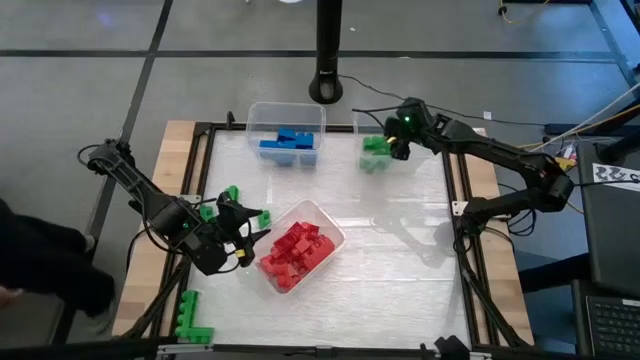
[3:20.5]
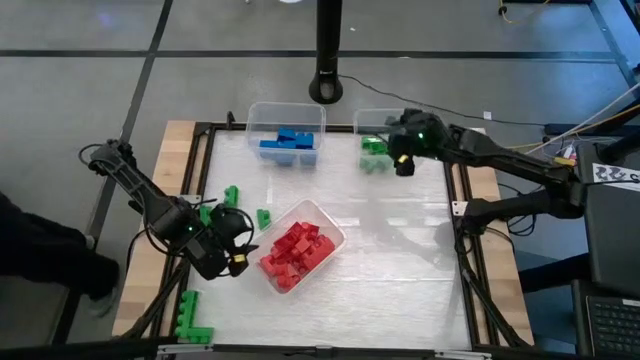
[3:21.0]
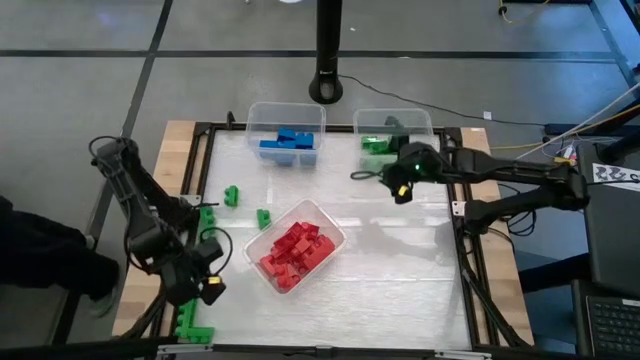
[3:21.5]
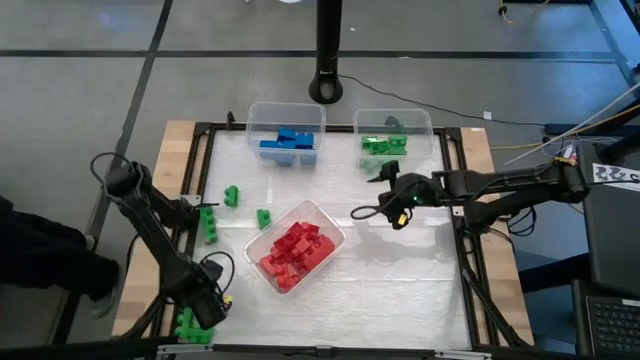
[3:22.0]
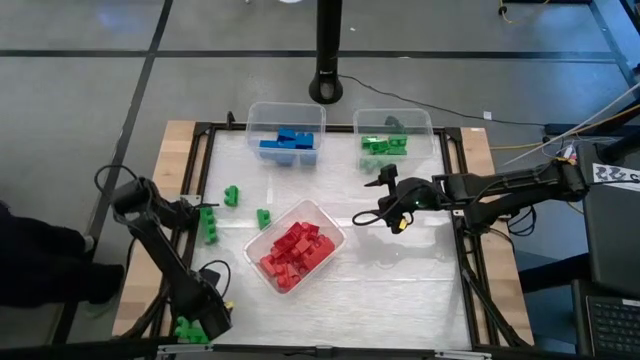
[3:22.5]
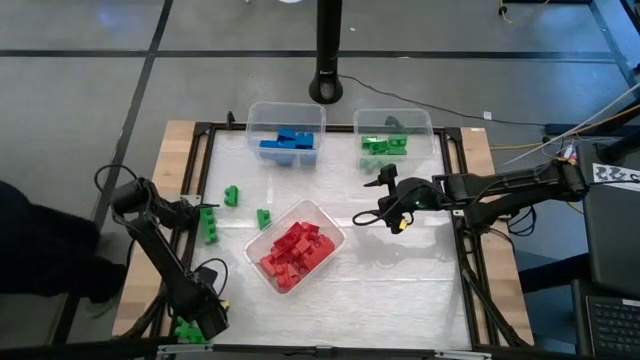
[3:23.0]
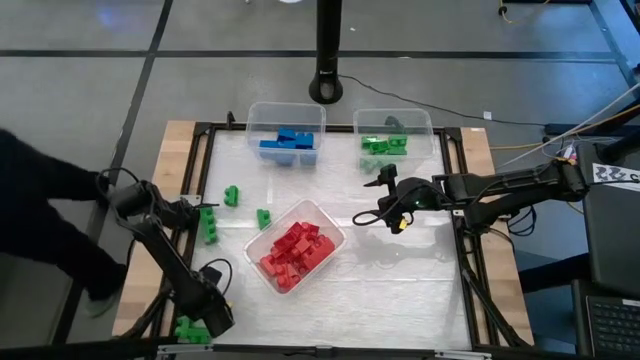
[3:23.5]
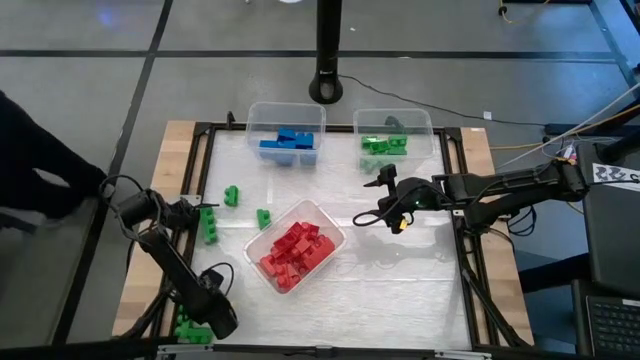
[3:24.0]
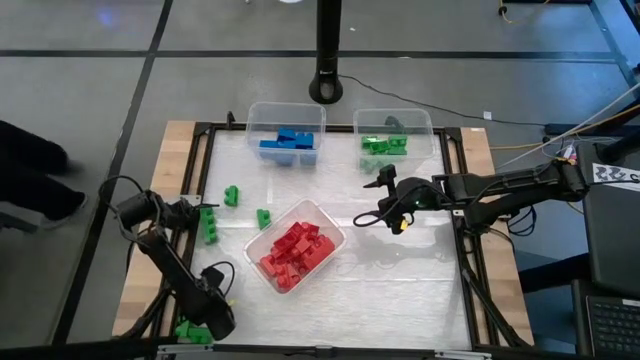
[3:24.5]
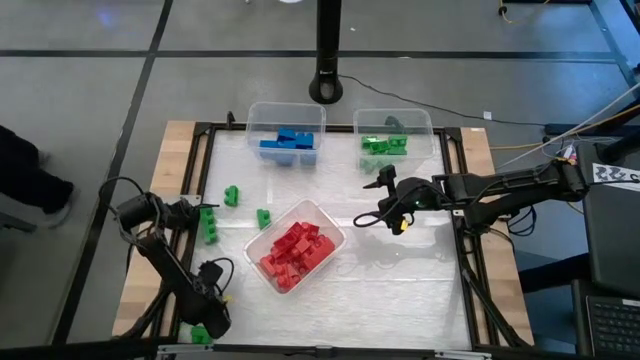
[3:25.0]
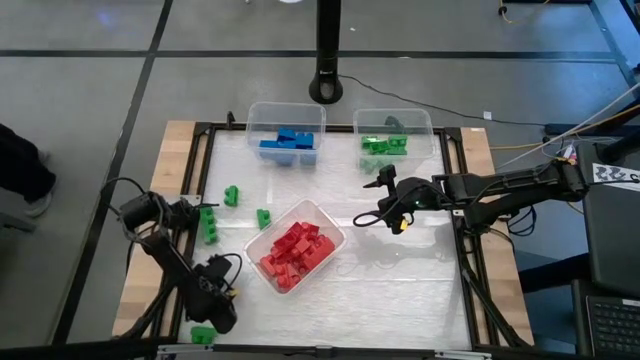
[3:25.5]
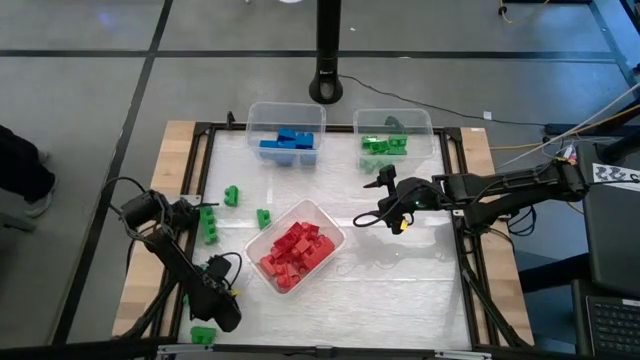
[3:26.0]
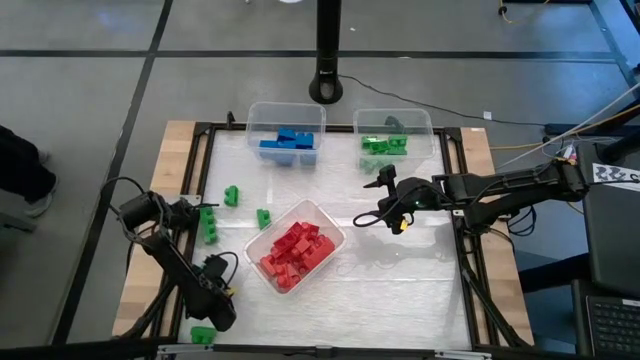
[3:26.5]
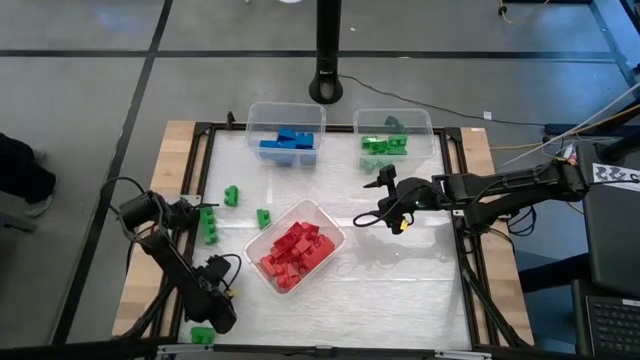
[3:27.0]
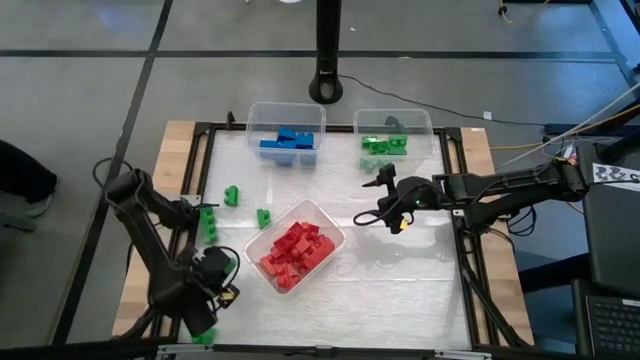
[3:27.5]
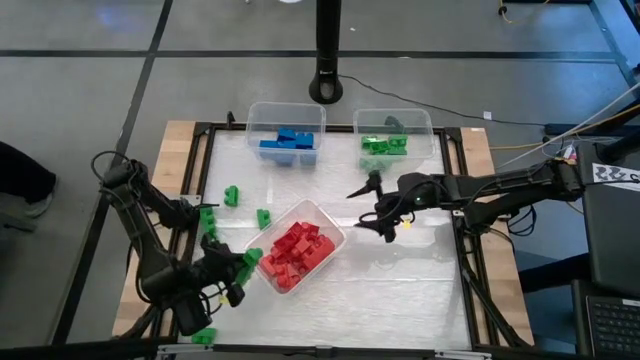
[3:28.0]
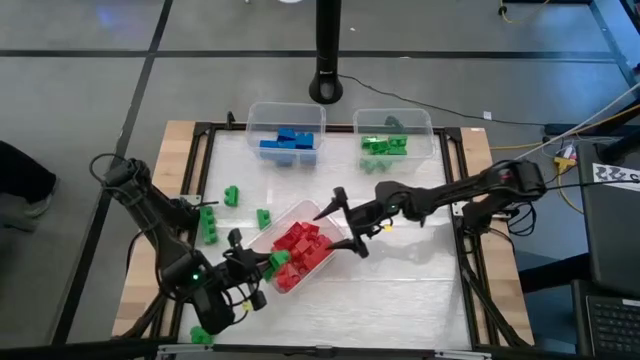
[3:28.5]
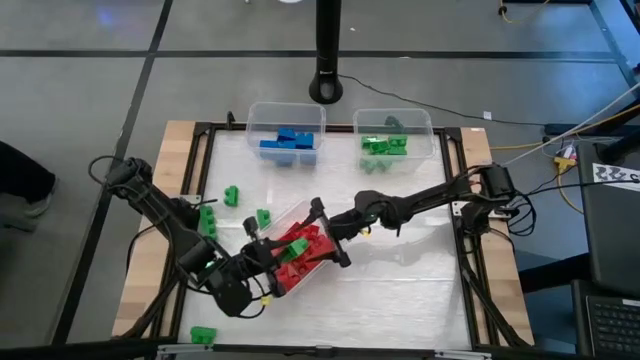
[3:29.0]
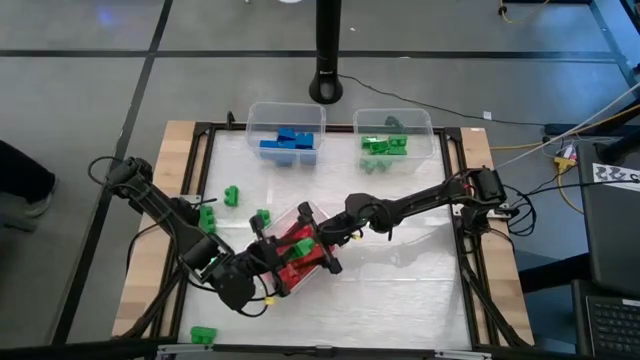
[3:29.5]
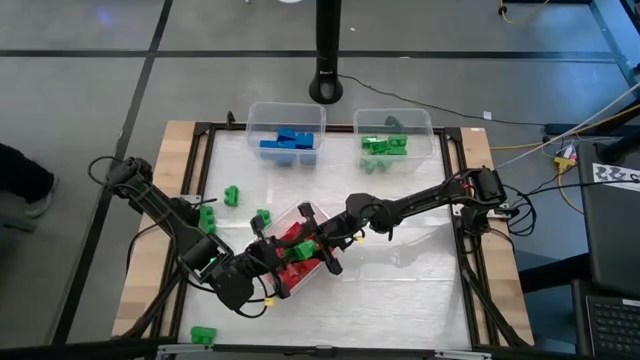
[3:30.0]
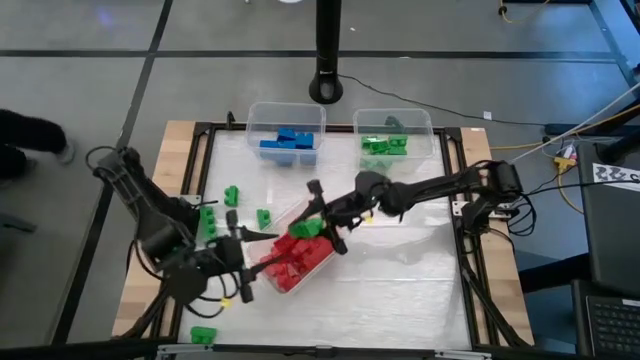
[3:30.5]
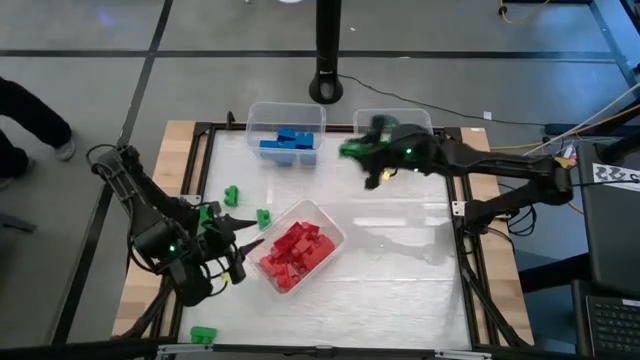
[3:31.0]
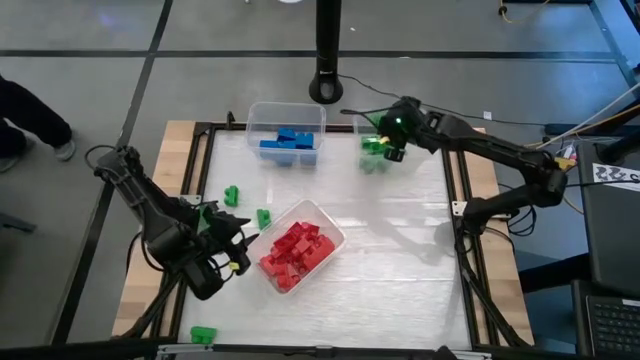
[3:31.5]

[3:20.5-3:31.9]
Task: Sort blocks
Put the green game piece into the top right transparent bin

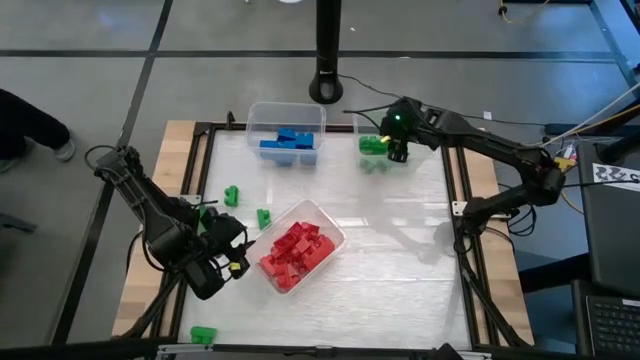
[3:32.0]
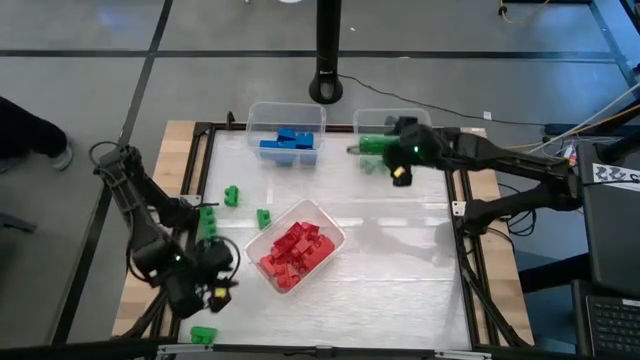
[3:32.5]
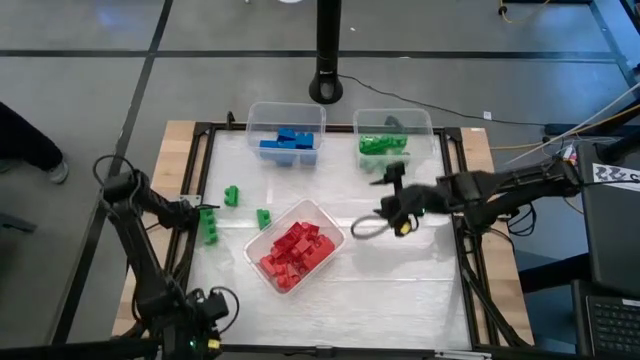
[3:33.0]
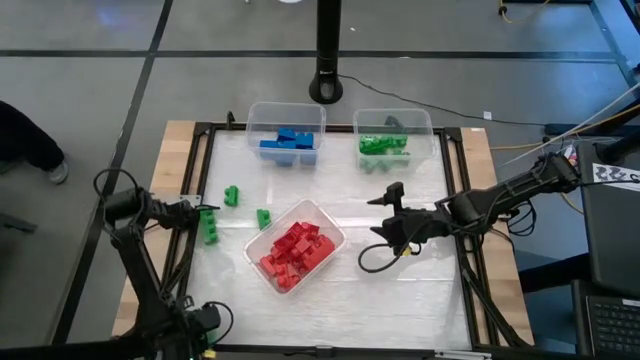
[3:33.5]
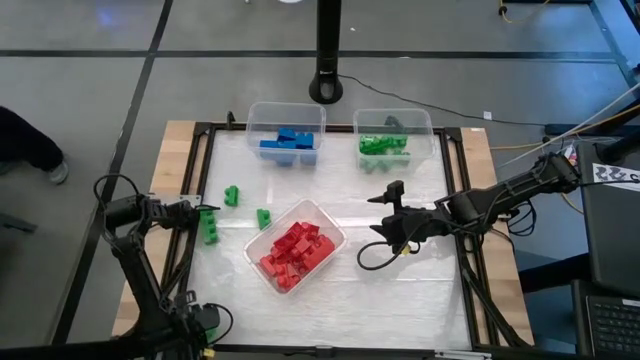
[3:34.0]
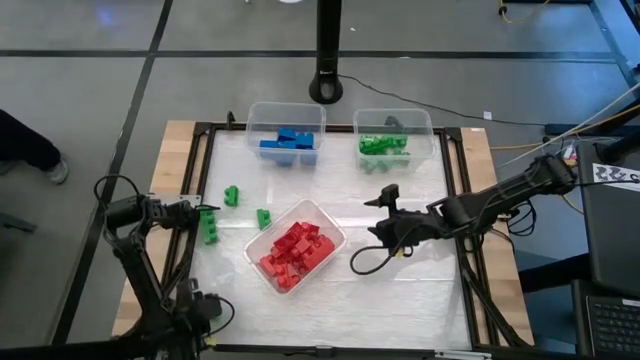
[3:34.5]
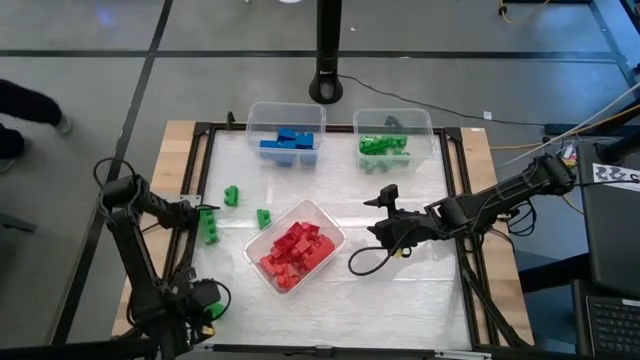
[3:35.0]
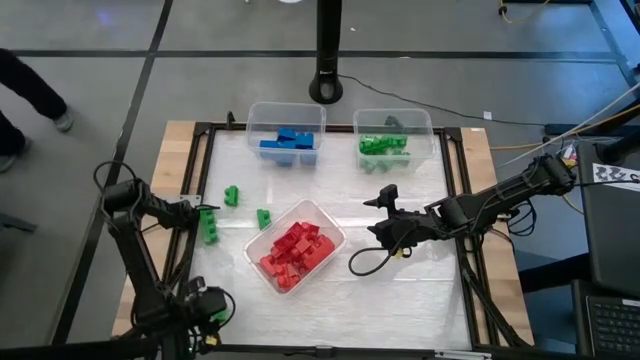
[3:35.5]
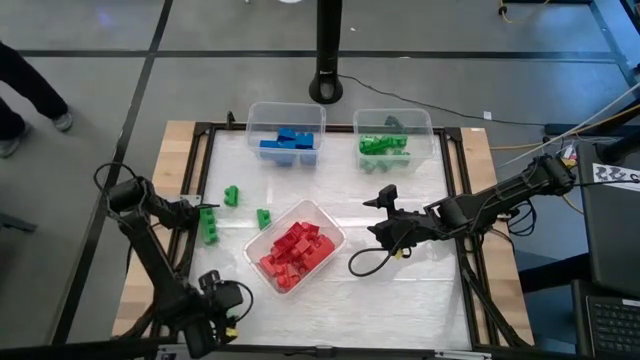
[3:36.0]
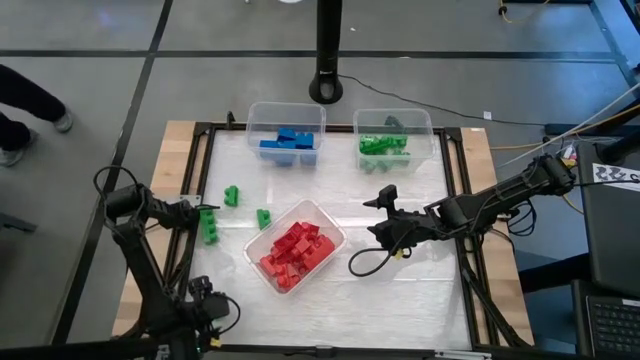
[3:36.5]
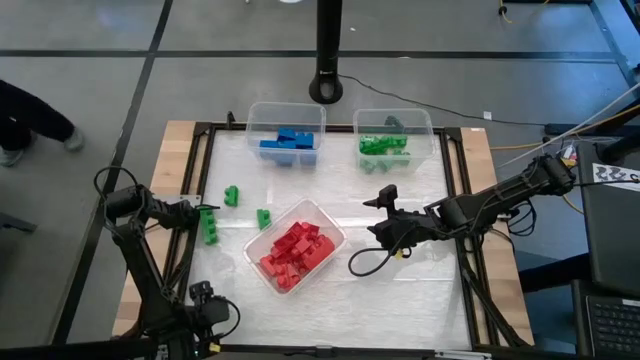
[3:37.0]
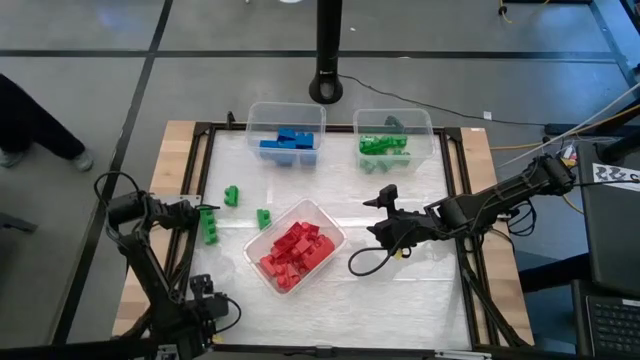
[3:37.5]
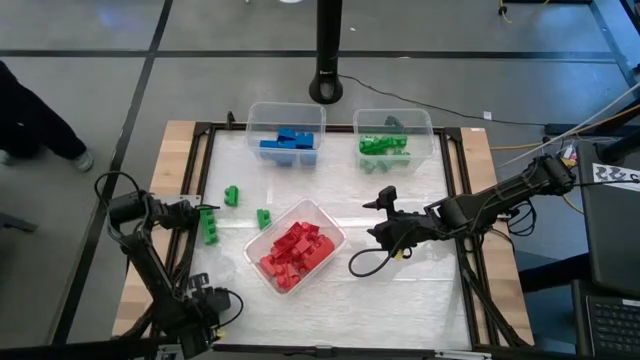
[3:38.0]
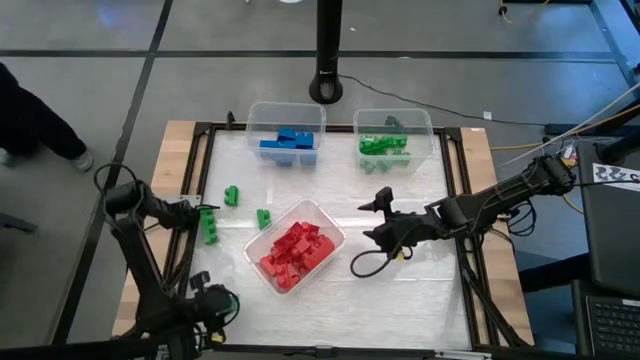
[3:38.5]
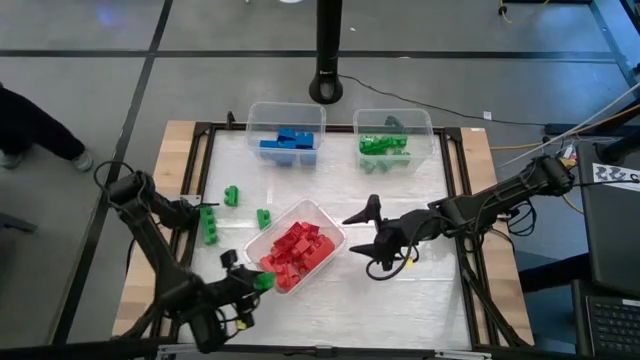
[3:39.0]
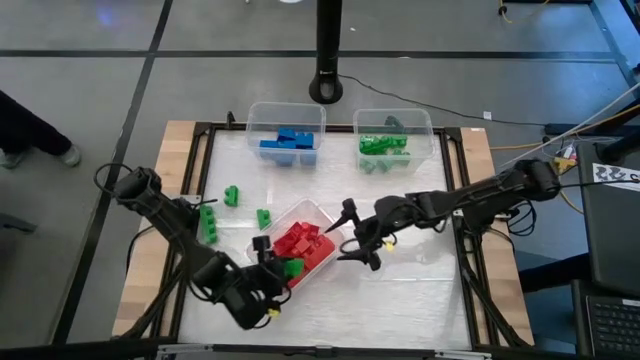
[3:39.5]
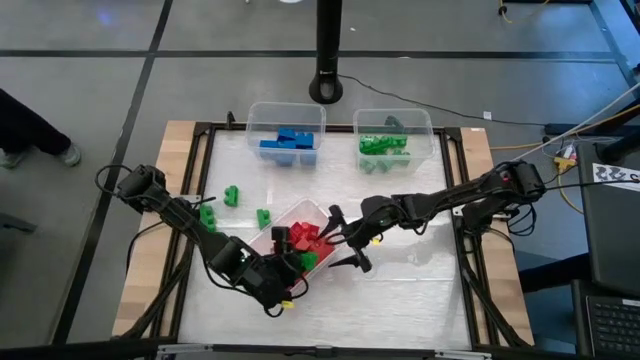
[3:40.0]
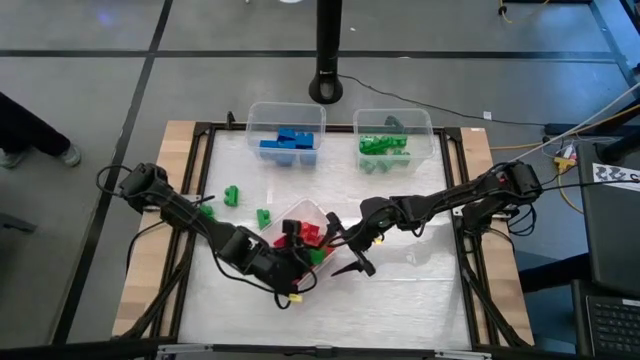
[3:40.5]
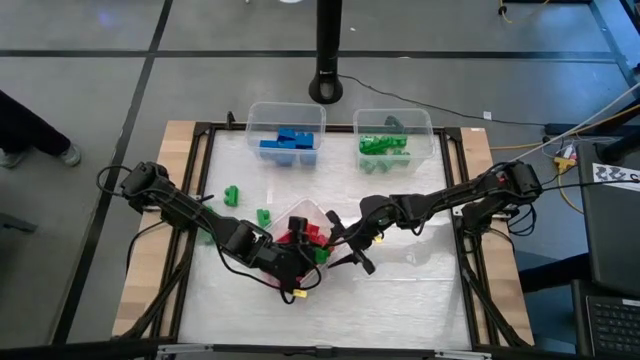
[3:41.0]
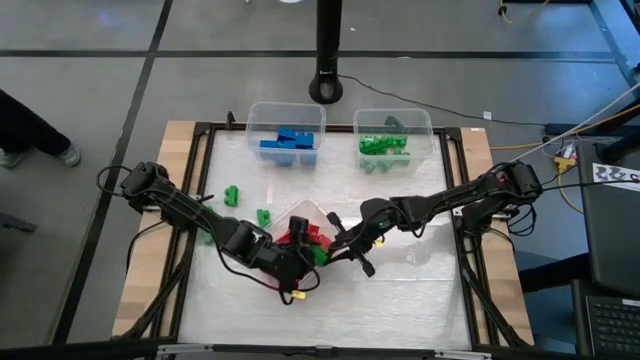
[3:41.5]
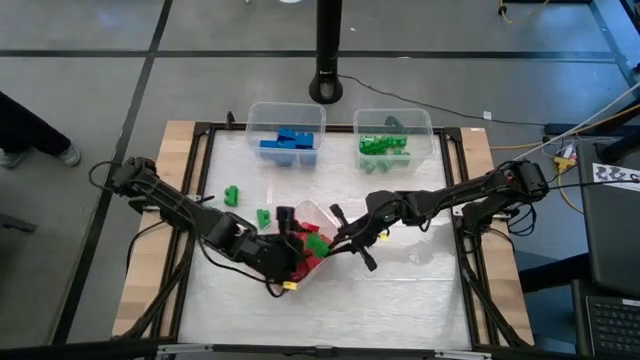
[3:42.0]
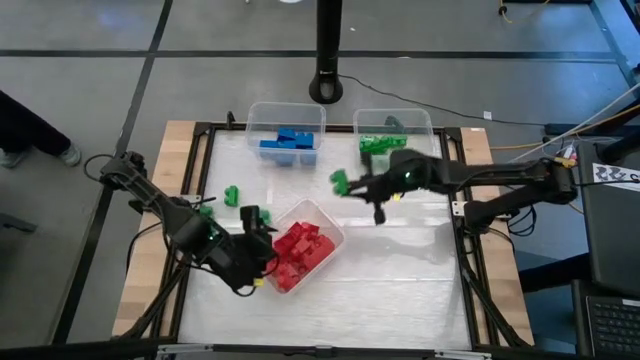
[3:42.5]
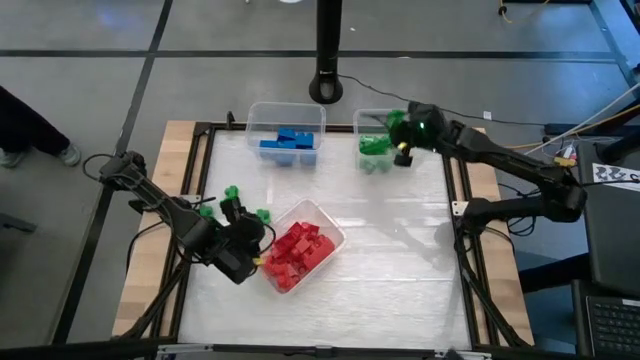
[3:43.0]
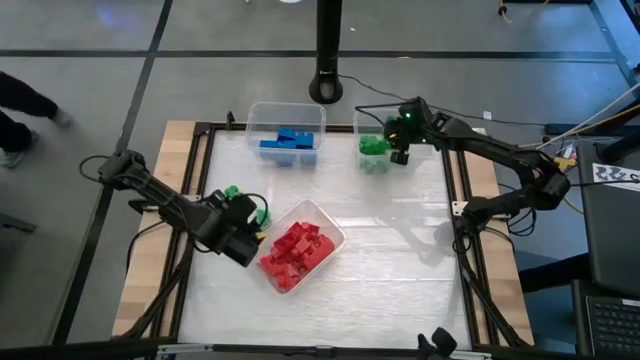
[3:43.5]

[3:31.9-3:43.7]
Put the green game piece into the top right transparent bin
